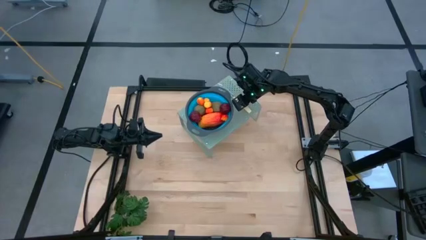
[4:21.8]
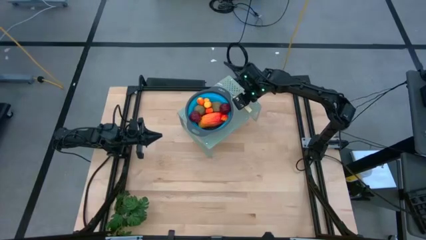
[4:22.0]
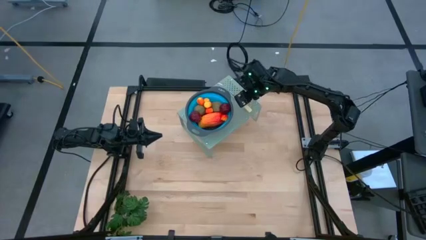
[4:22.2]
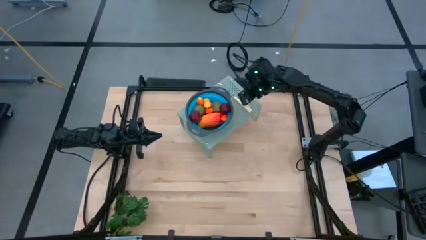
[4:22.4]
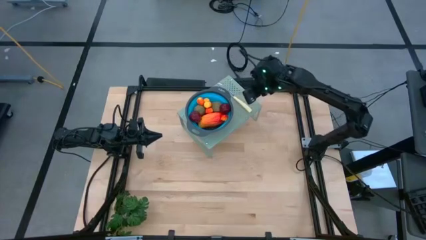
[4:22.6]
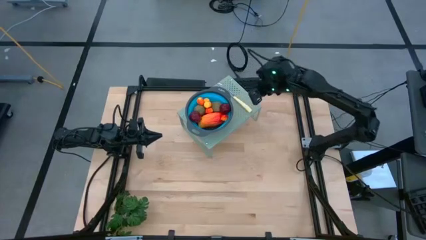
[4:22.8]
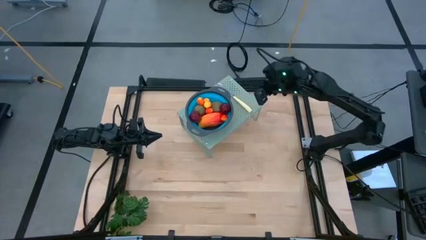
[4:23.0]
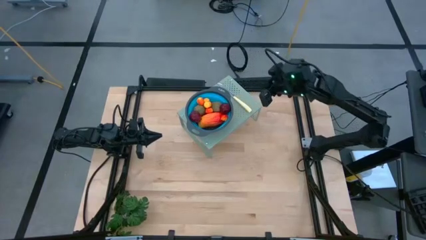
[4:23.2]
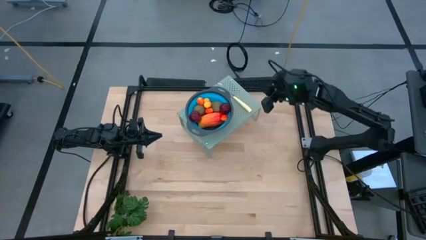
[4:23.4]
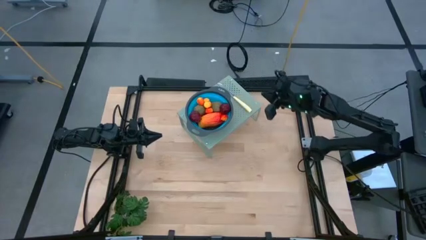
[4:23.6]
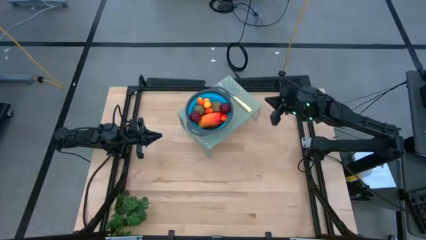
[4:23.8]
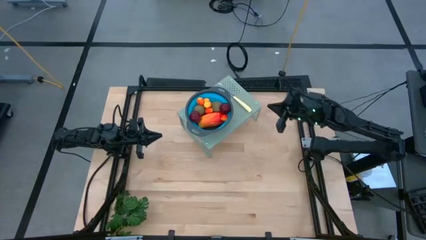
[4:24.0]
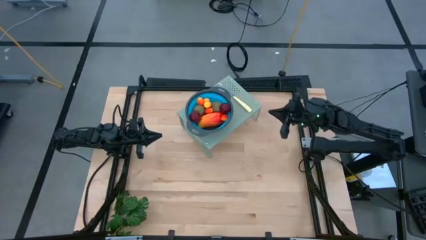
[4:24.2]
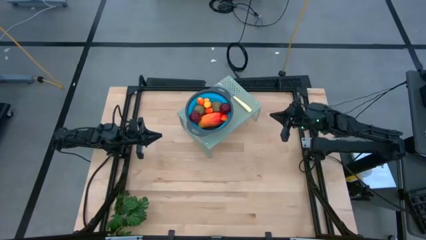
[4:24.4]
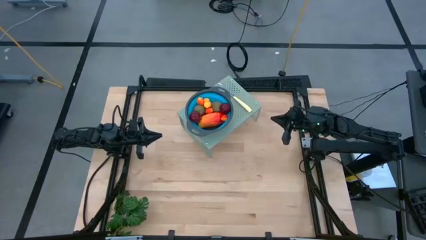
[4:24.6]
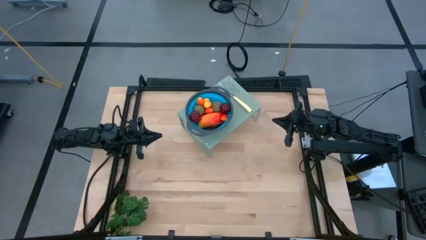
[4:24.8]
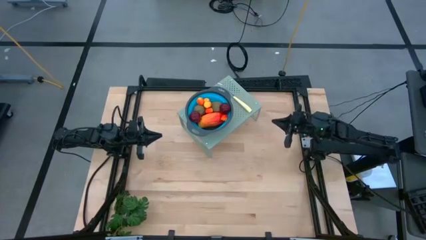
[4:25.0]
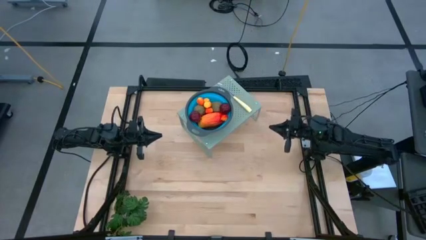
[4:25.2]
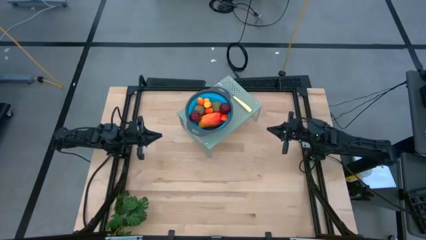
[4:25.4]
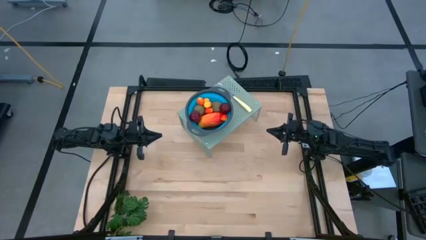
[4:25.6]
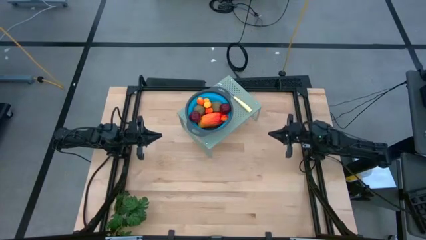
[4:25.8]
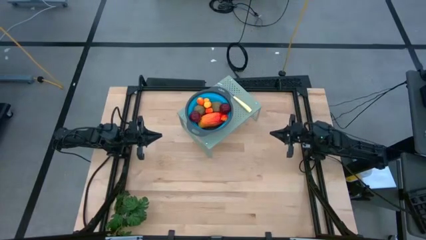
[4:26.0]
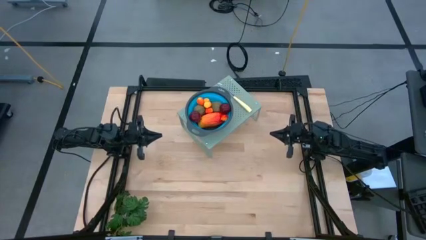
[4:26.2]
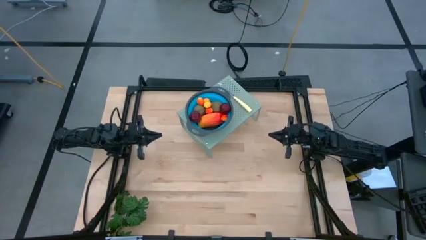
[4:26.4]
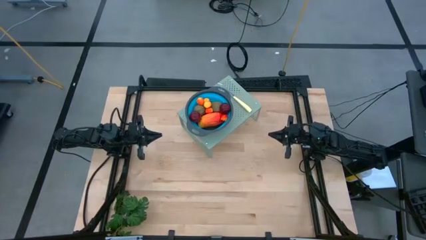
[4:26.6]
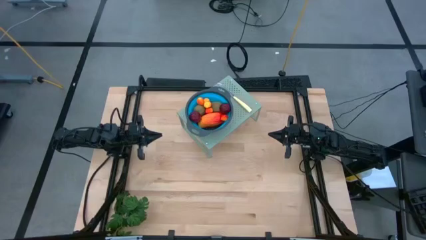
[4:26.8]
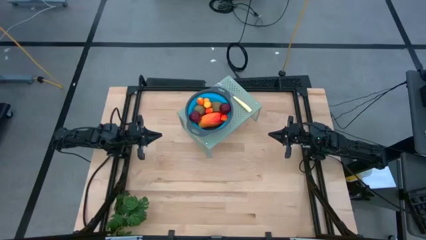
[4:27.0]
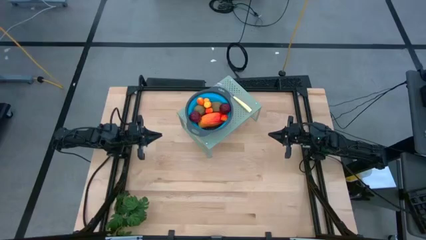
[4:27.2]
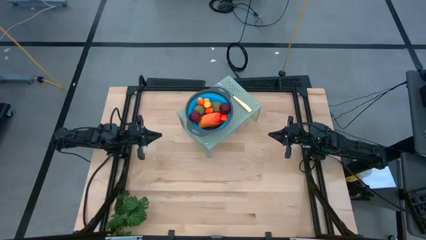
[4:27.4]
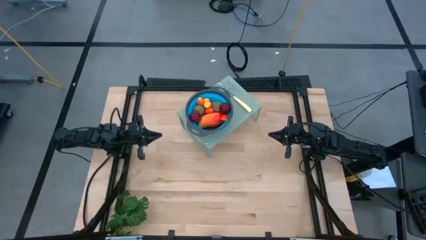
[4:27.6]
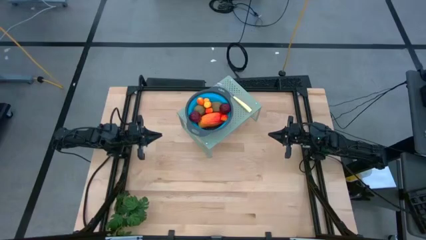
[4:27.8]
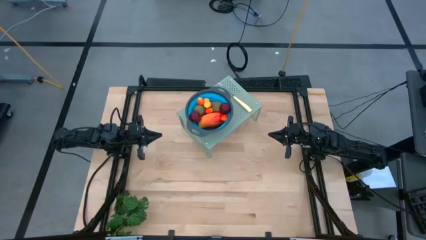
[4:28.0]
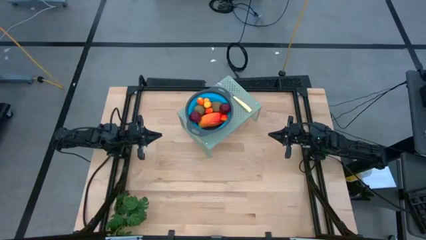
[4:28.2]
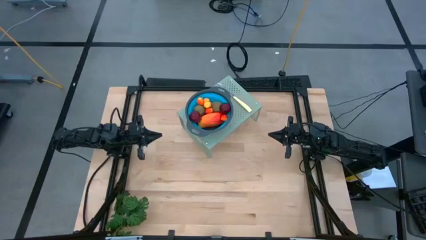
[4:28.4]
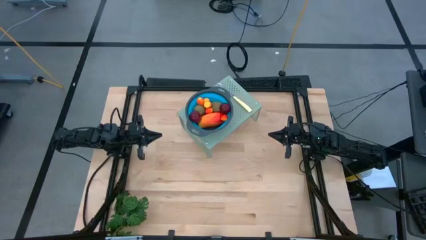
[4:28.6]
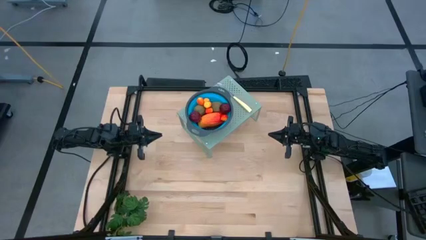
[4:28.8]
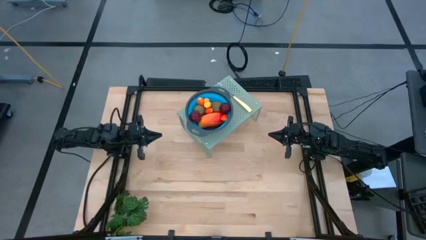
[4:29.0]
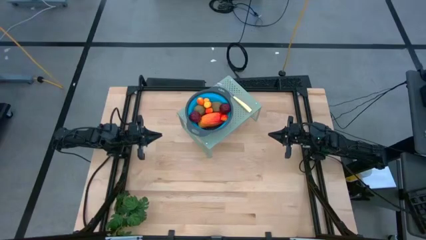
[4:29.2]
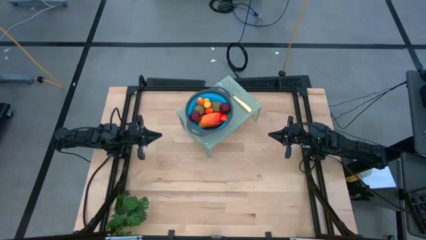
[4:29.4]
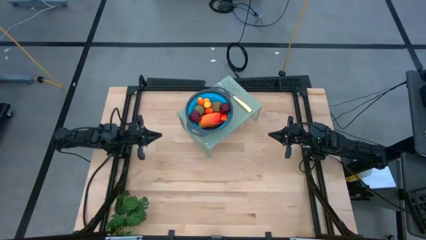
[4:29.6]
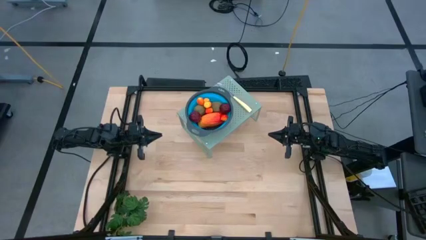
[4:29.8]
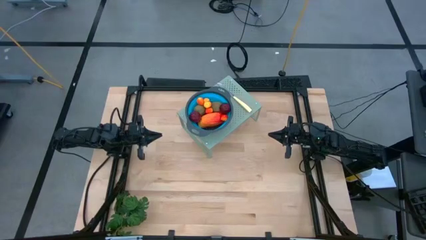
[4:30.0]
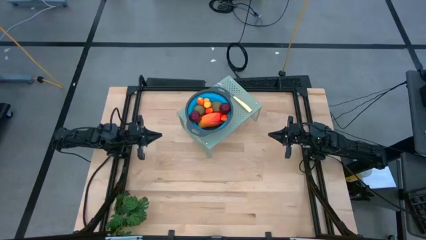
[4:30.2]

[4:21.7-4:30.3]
Task: Pick & Place Fruit
Return to Home Position

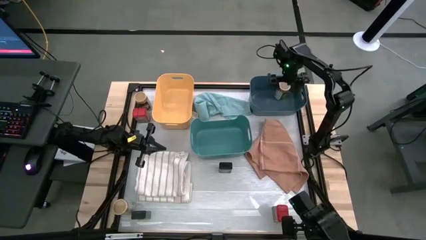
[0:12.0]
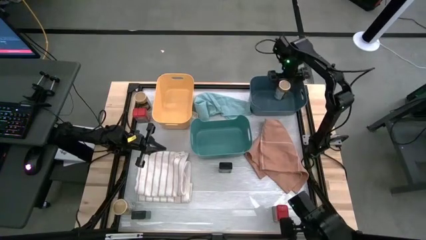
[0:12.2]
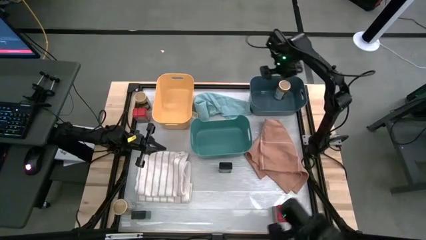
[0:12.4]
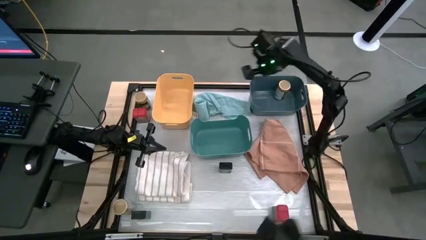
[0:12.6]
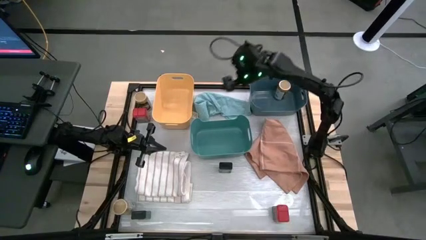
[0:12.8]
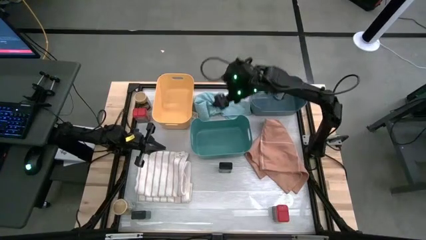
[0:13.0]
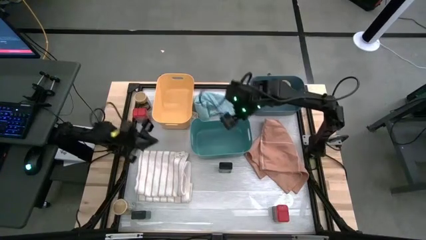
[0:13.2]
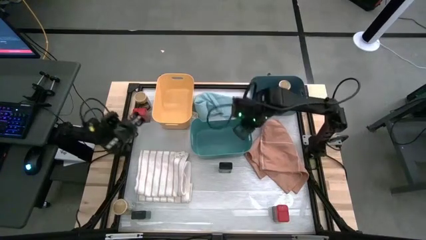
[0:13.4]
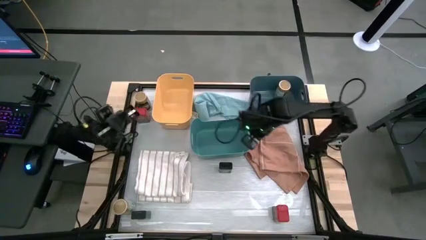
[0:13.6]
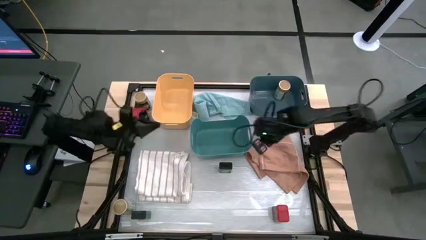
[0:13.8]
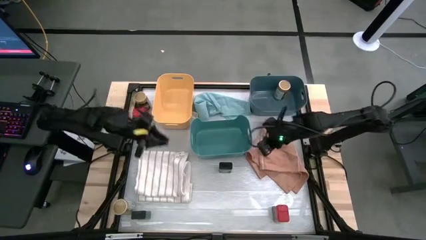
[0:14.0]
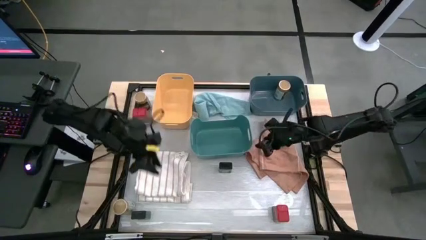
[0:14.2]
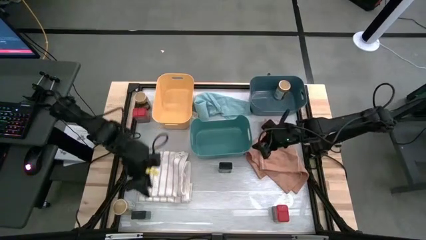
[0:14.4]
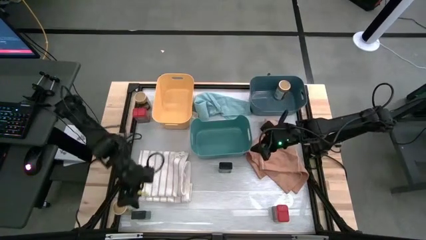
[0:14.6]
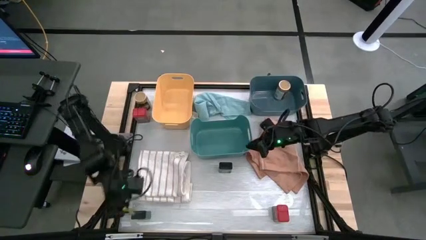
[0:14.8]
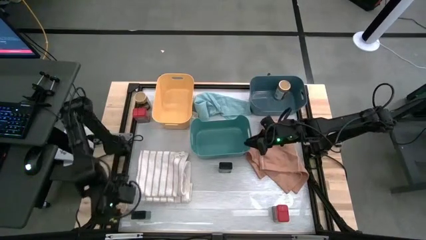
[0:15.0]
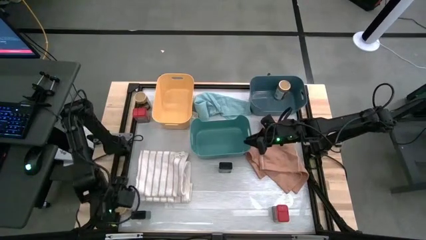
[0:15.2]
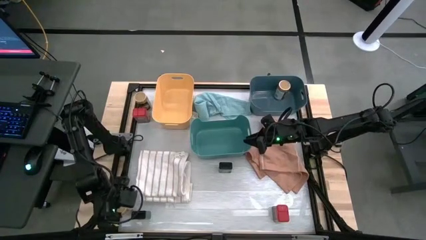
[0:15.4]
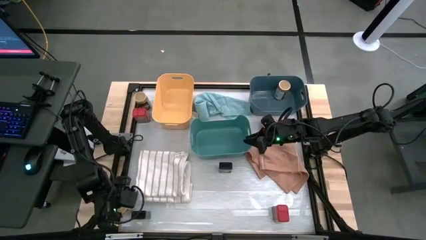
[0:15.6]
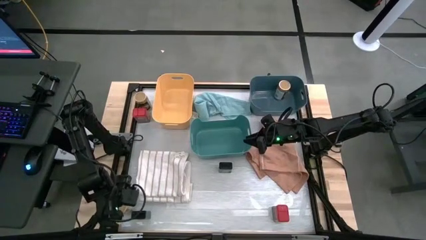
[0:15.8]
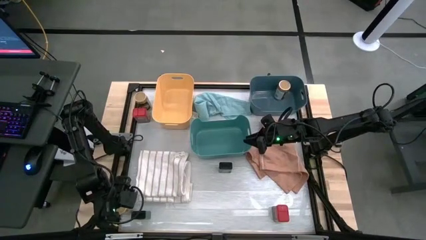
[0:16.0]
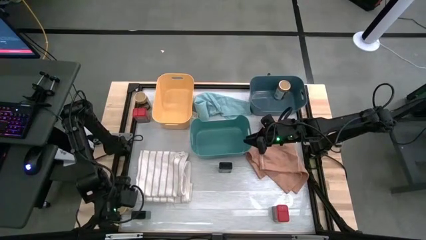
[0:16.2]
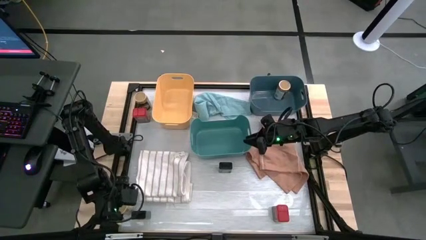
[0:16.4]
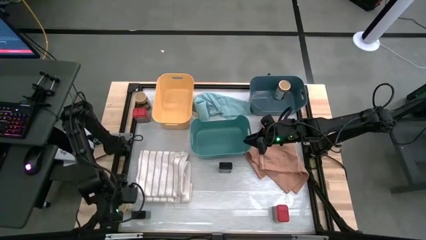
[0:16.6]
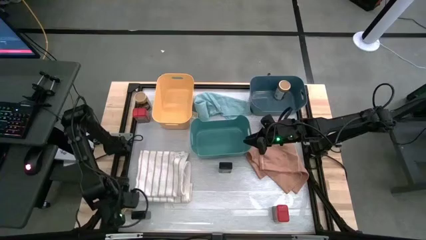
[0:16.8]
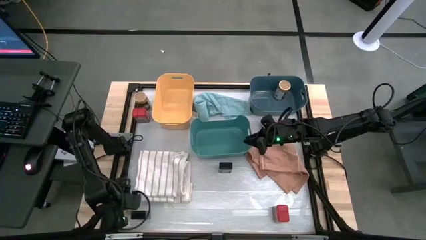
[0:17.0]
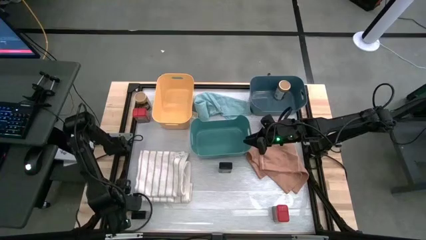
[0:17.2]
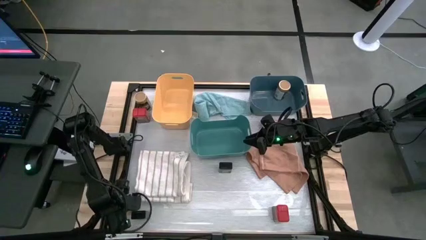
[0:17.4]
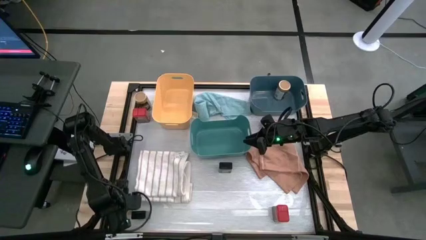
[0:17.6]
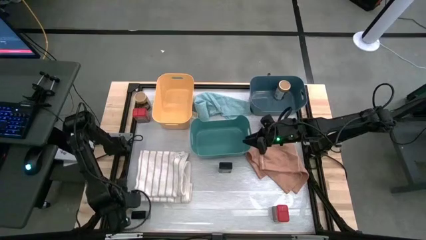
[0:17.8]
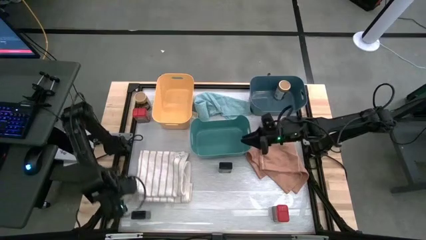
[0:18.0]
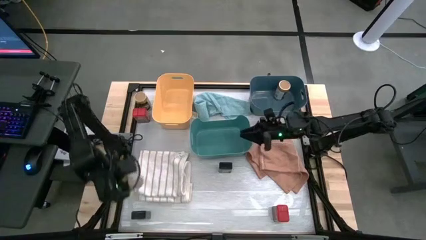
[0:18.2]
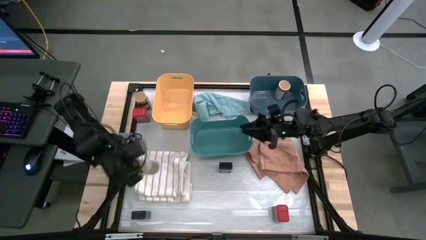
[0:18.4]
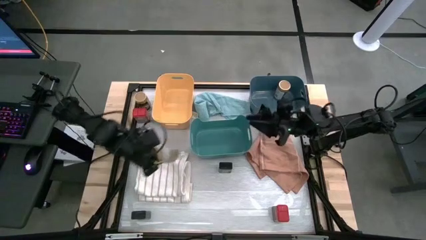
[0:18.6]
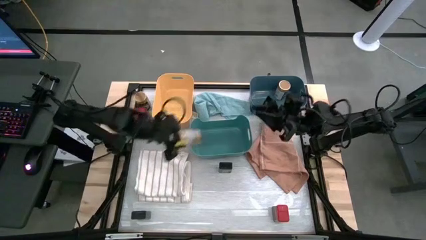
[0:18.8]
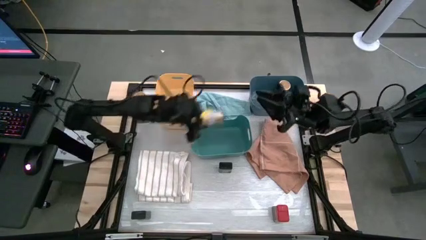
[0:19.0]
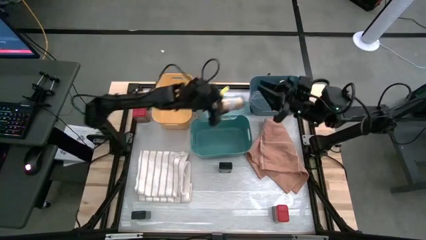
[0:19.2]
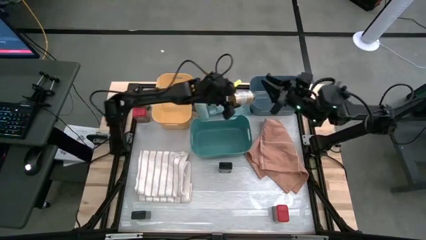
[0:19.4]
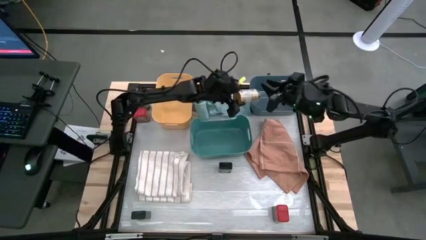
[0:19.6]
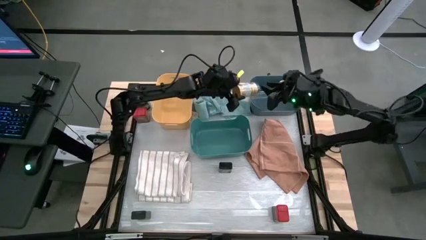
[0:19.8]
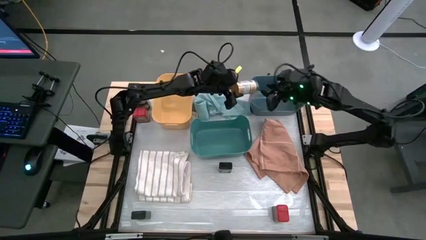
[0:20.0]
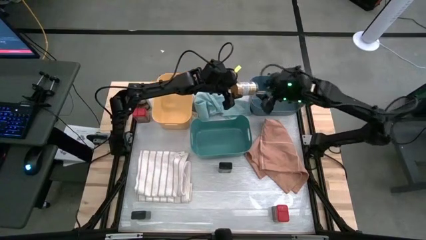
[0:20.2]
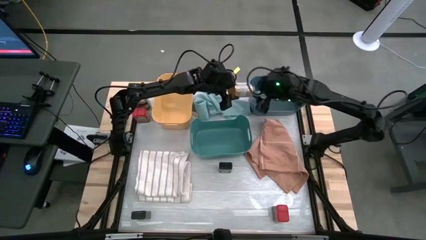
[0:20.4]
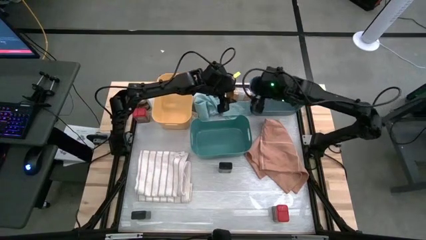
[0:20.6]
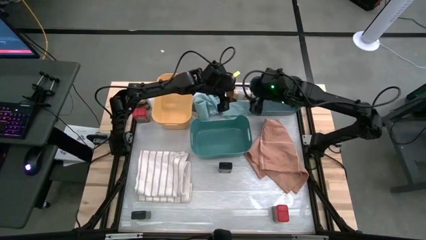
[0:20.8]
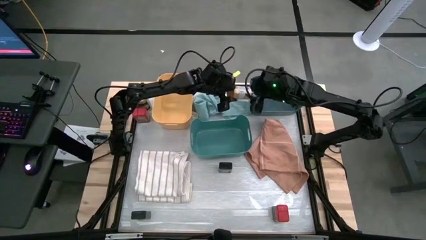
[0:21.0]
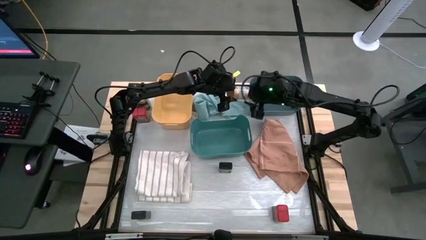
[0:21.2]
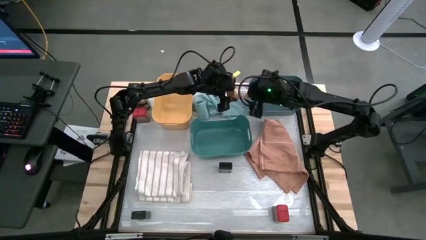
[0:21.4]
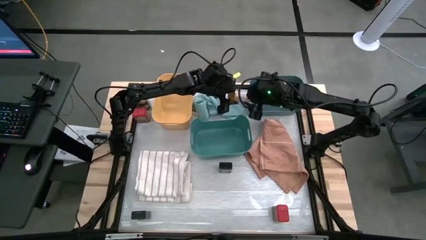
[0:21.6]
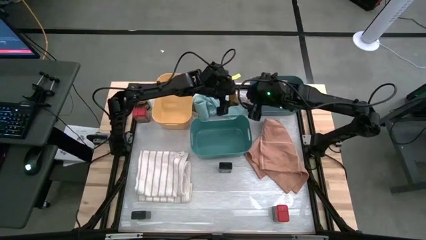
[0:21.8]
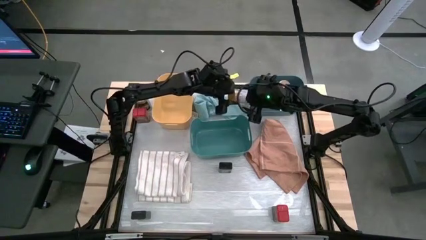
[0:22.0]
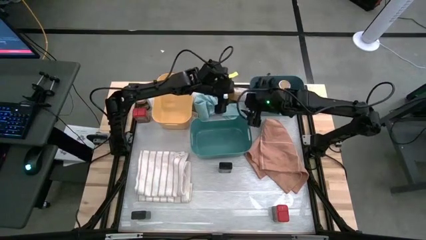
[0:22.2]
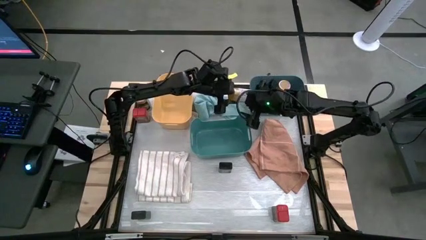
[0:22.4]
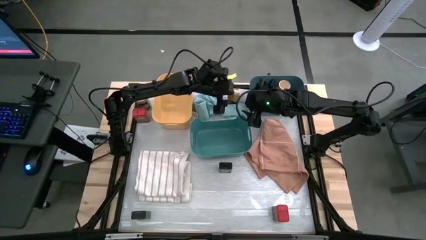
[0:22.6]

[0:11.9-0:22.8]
Task: Sort spices by type
Put the bottom gold seasoning bottle into the blue bin
